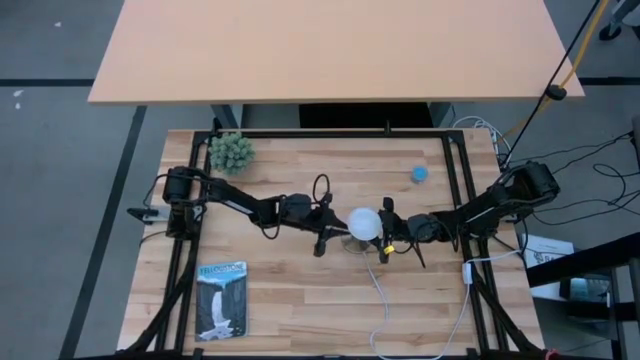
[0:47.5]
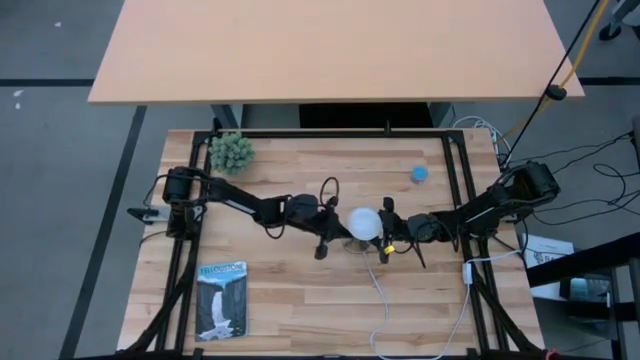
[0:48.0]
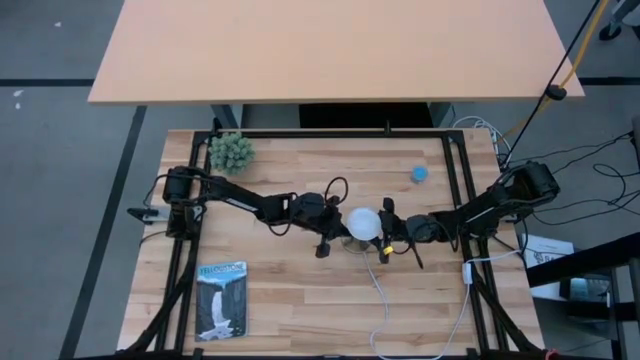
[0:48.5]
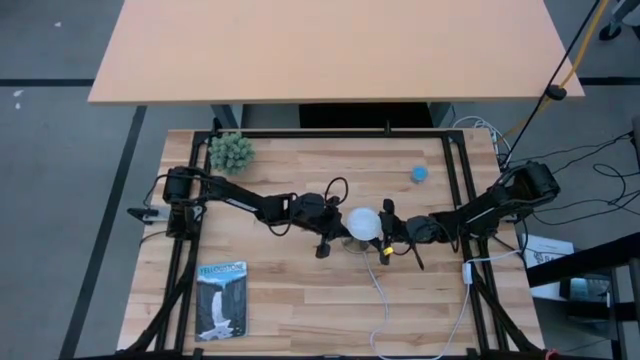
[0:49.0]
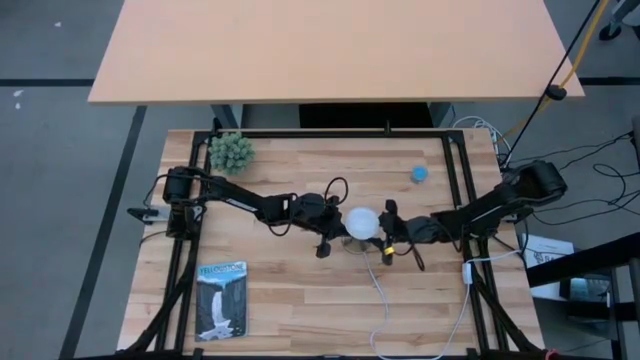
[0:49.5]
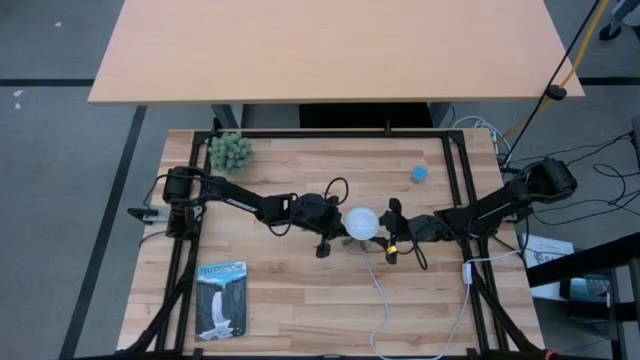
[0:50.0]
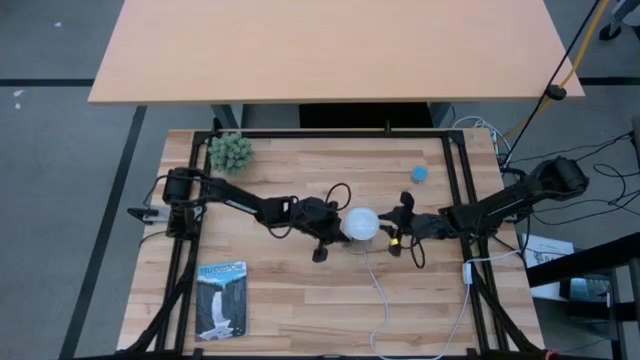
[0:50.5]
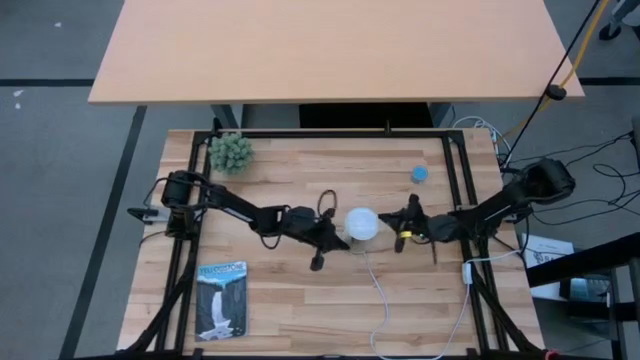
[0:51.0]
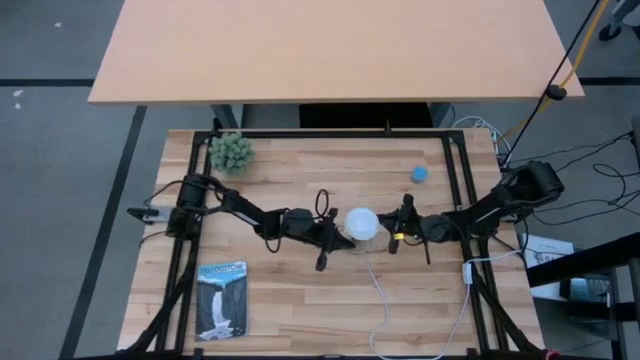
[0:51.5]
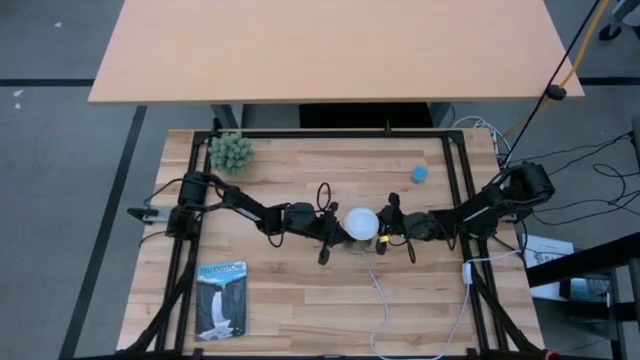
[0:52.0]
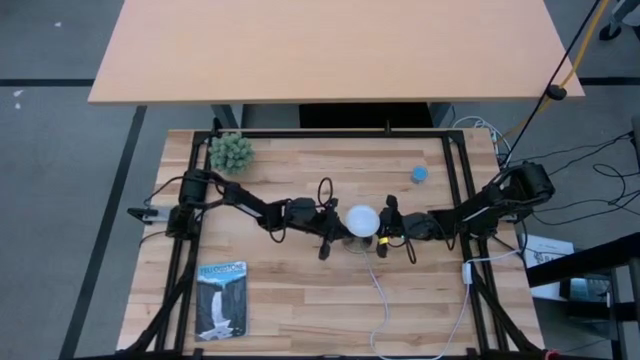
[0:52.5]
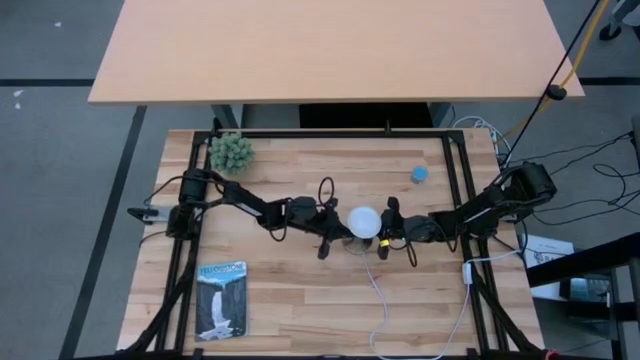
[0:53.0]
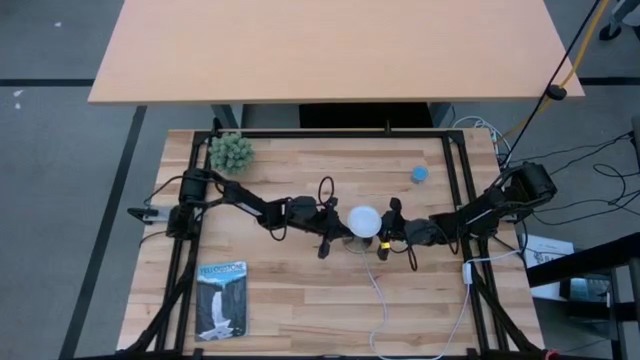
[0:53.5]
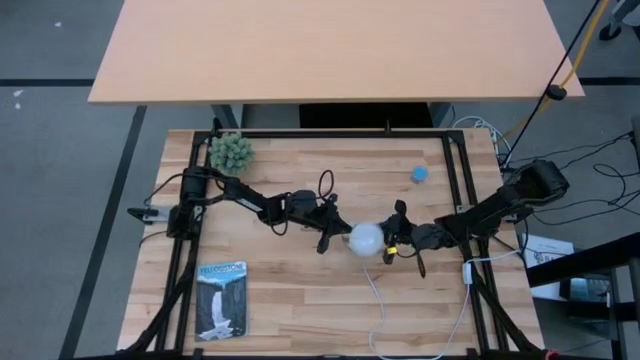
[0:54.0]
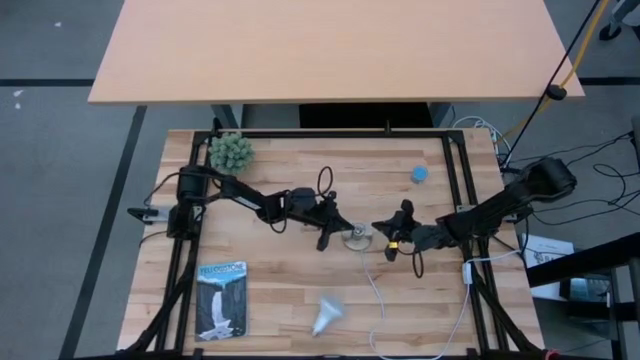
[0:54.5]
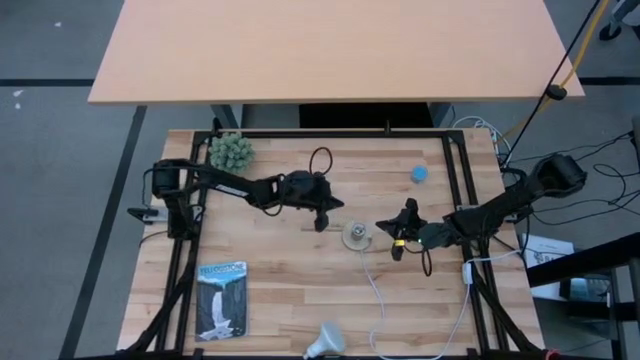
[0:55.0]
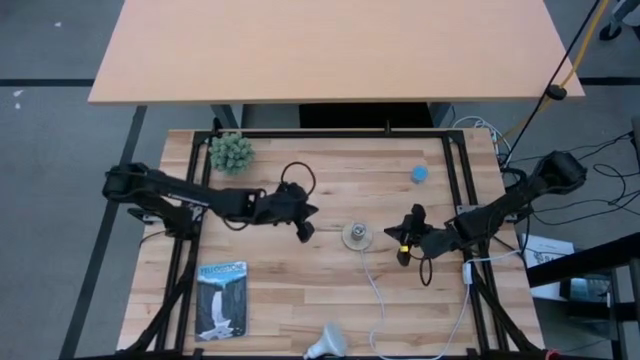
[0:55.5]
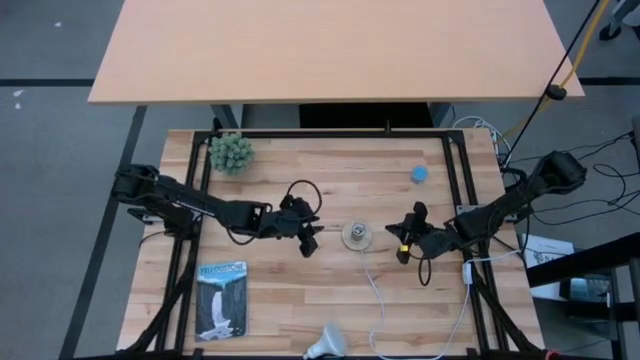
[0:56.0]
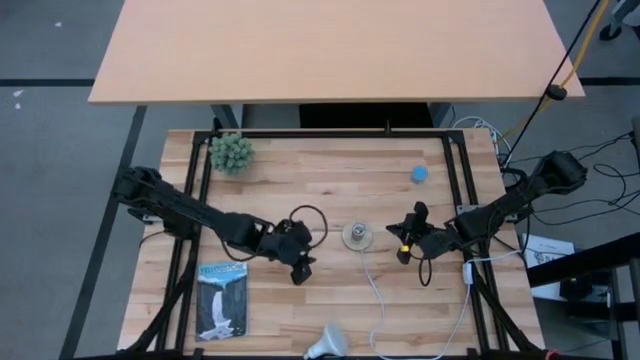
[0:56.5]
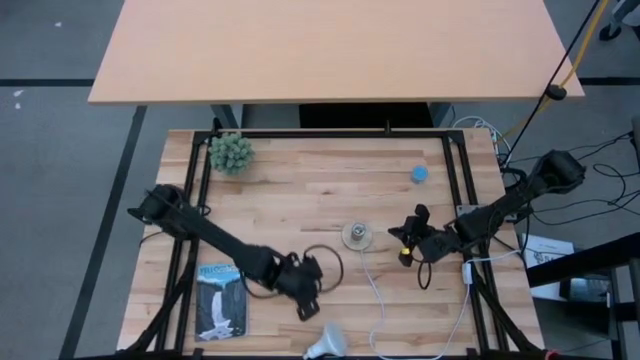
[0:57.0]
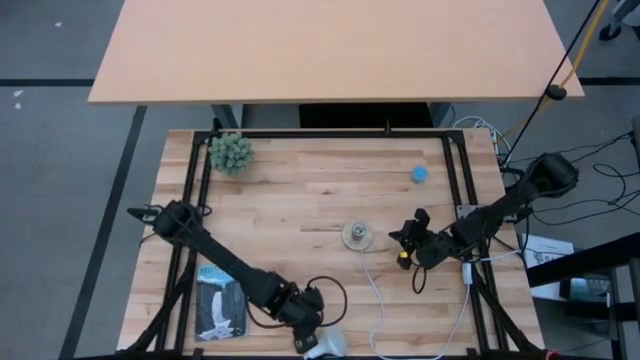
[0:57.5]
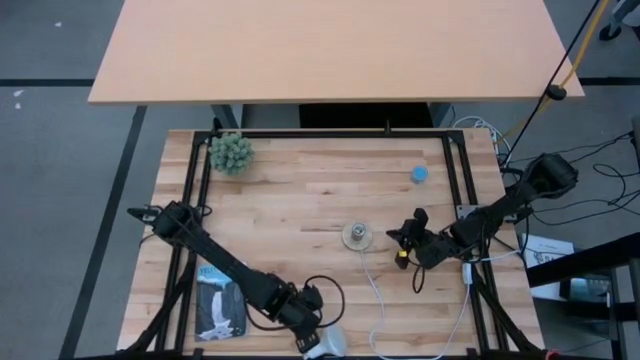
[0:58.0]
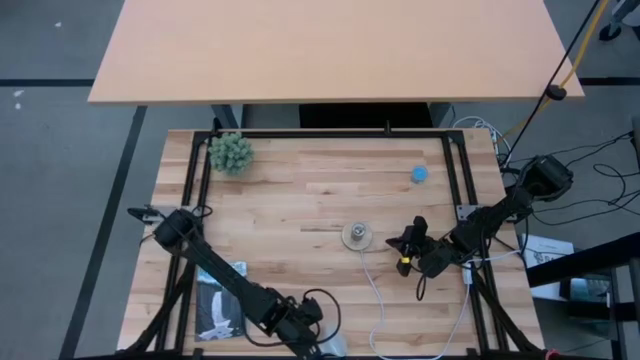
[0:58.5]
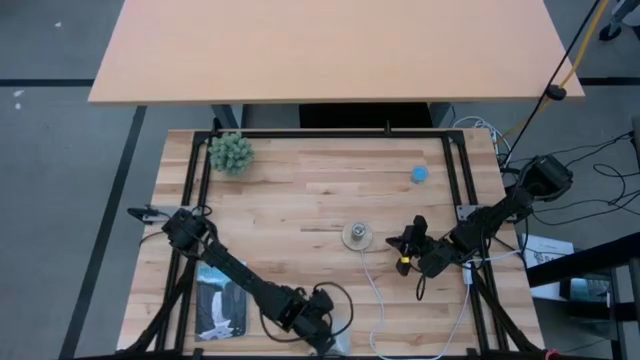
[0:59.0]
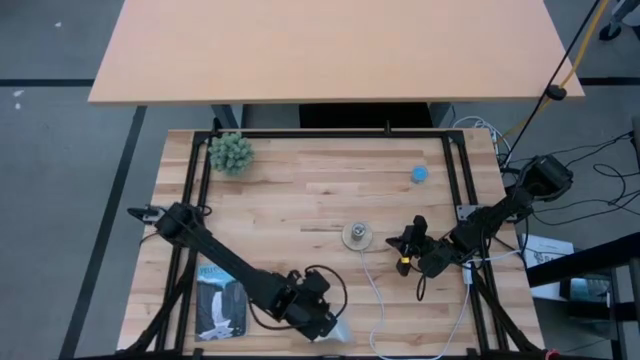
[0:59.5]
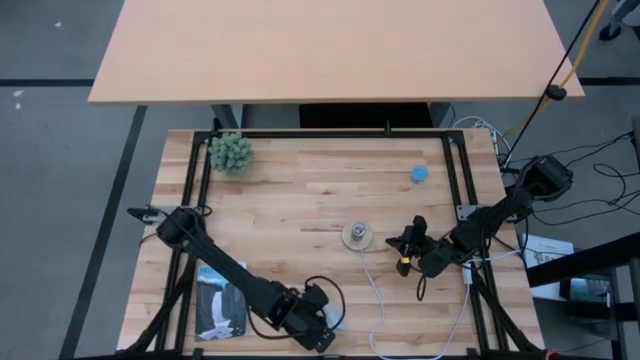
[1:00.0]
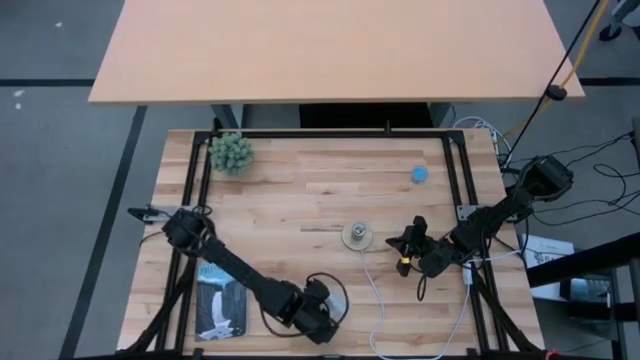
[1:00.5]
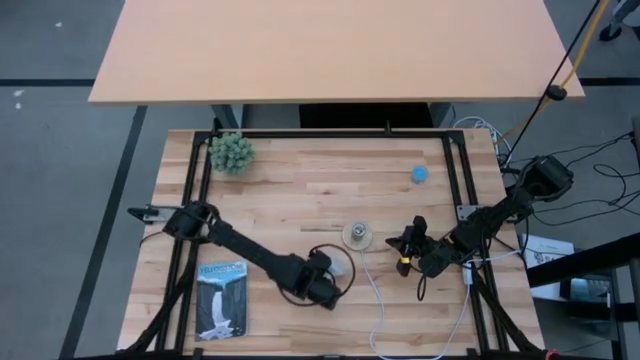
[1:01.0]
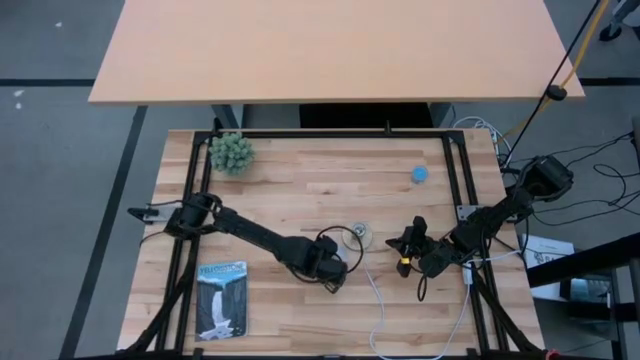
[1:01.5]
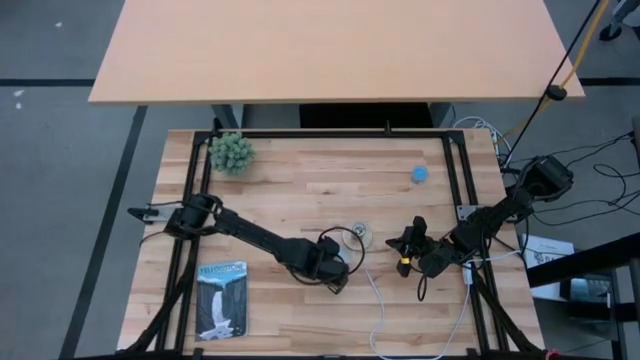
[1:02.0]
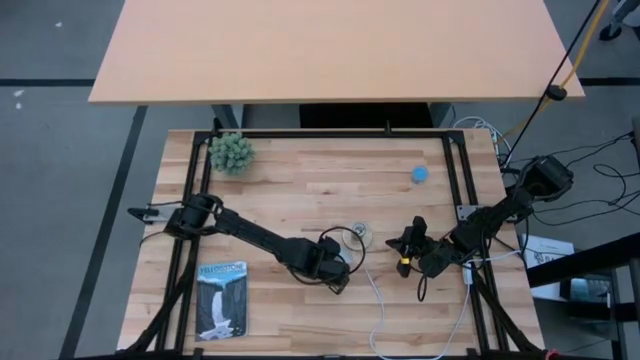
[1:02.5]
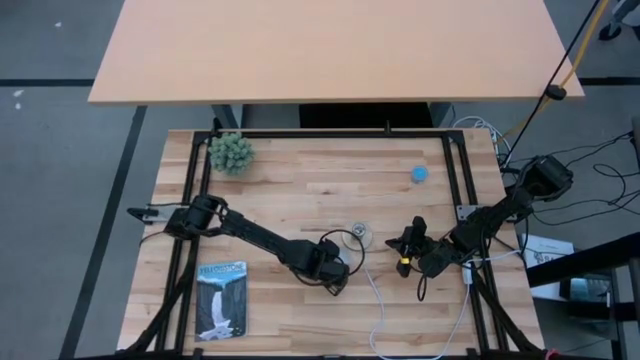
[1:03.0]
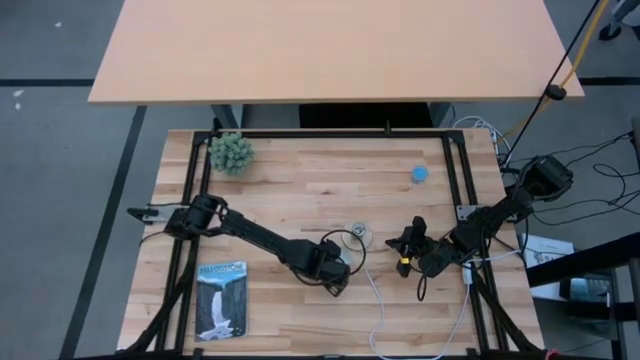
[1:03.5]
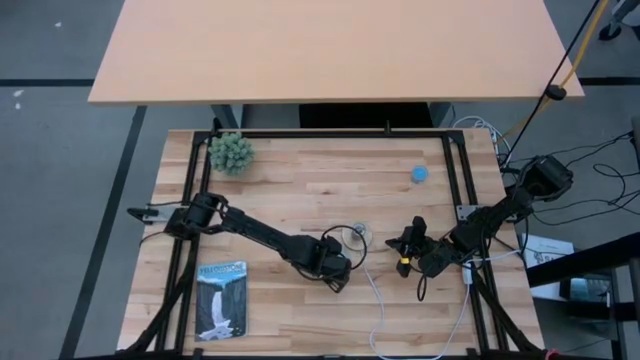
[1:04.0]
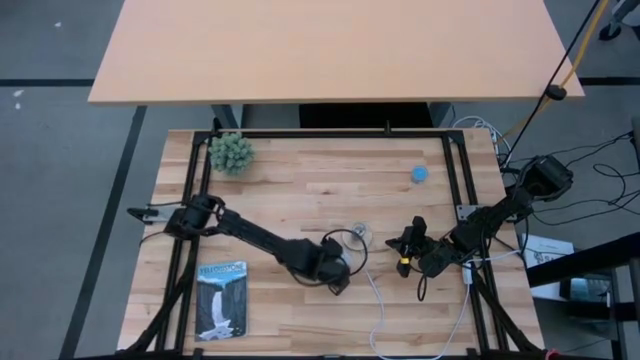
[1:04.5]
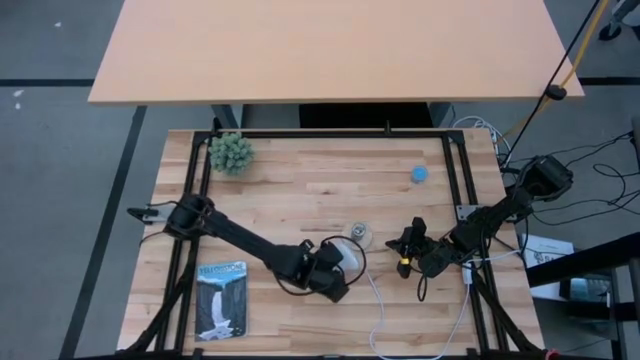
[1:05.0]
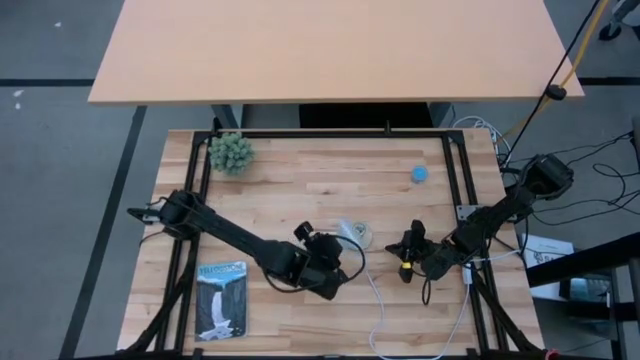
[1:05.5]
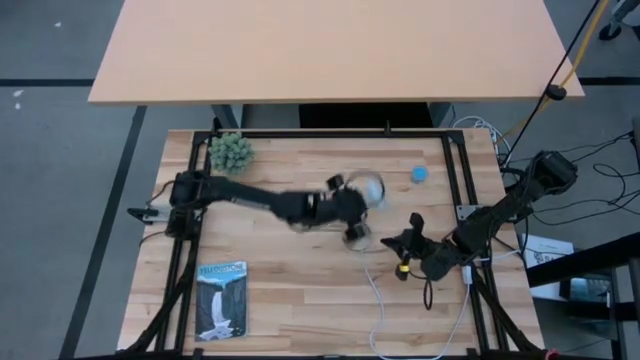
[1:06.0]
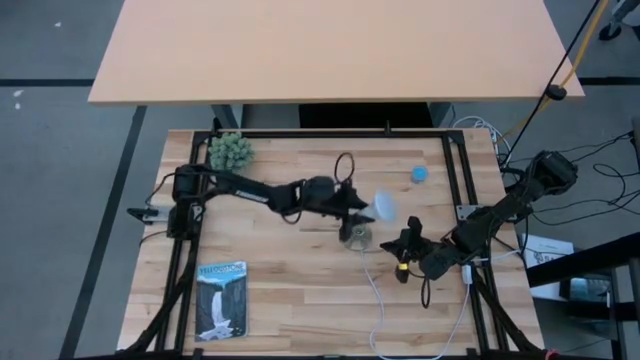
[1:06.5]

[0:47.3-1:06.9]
Task: Screw lightbulb
Insert the lightbulb into the lamp

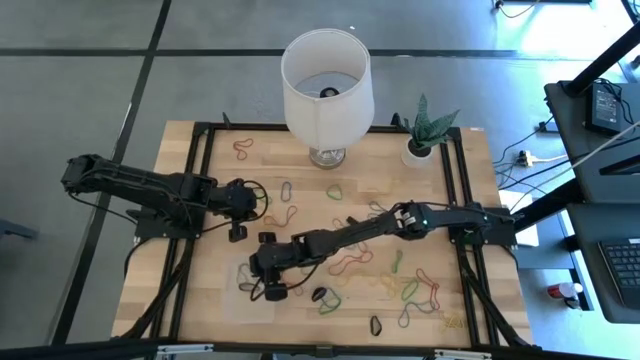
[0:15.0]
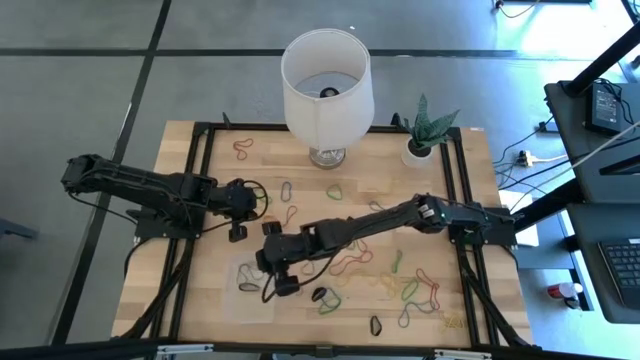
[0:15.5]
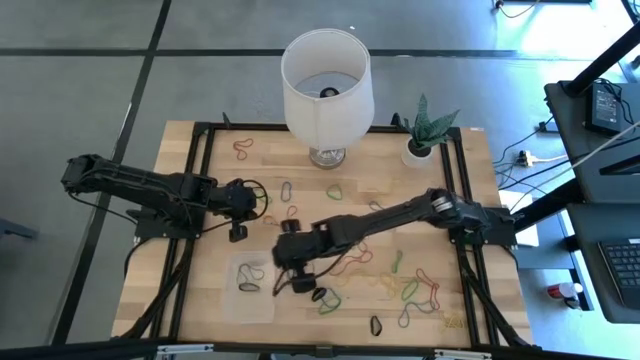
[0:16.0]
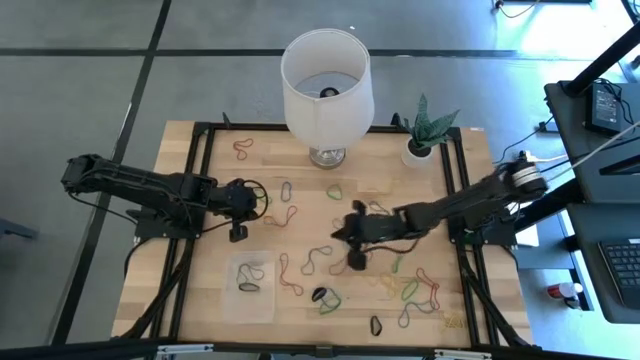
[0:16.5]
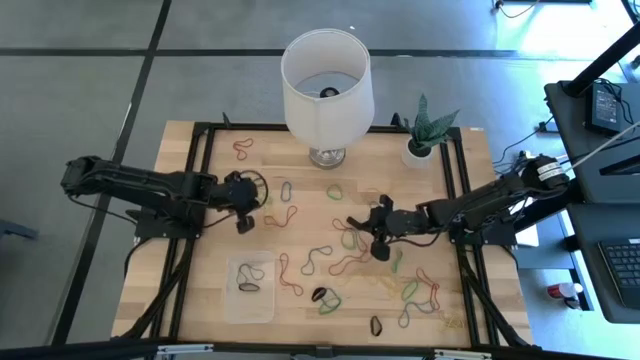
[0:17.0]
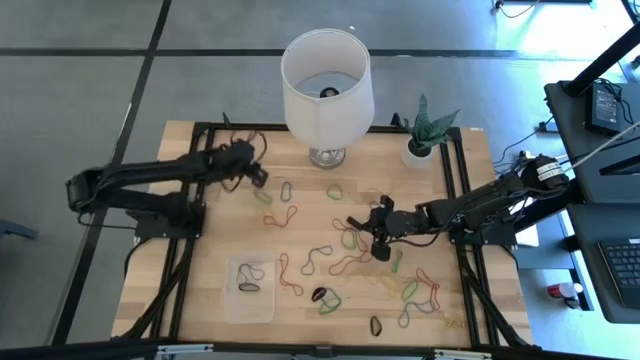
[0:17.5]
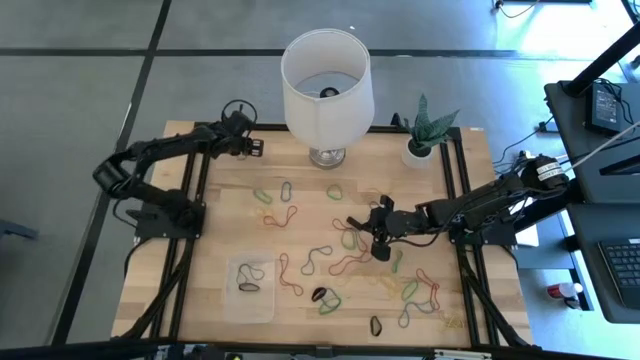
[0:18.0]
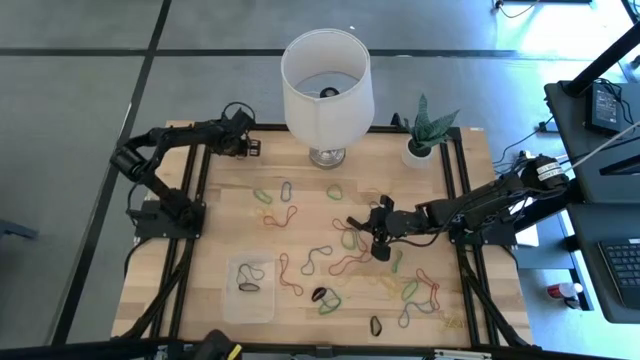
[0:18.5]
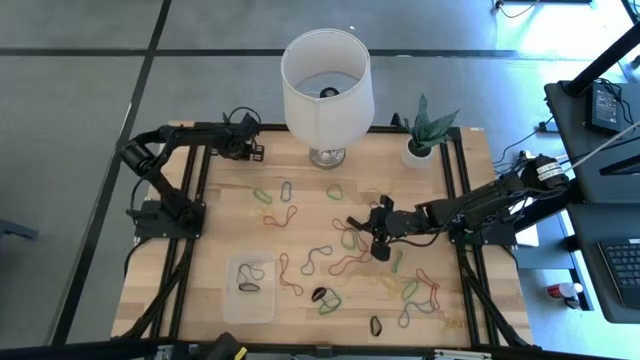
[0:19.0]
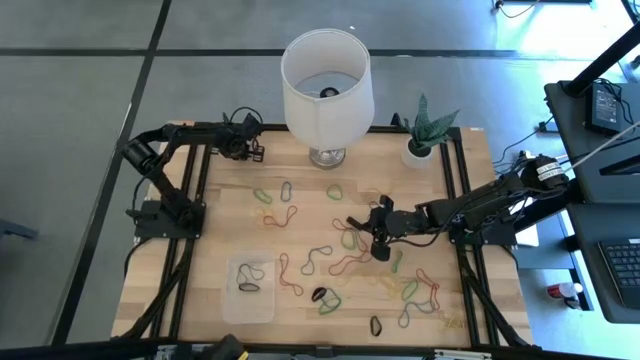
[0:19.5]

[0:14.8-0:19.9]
Task: Pick and place rubber bands into bin
Put the red rubber band into the transparent bin
